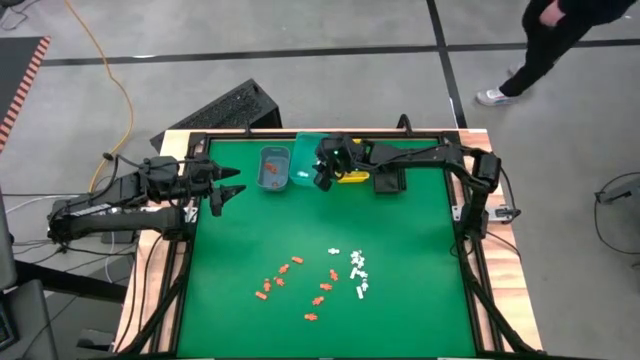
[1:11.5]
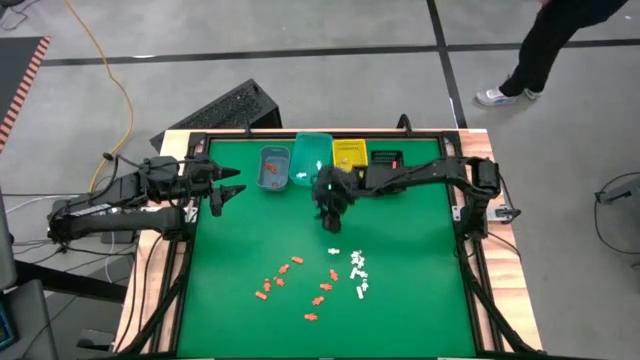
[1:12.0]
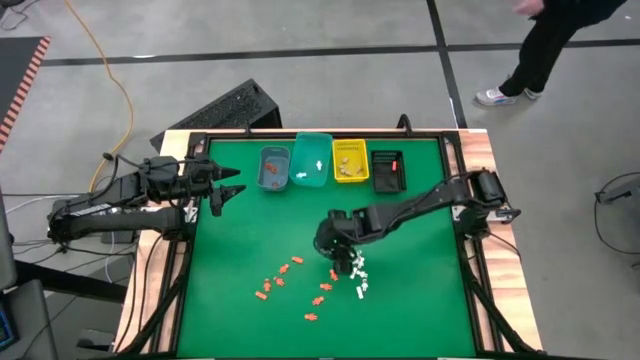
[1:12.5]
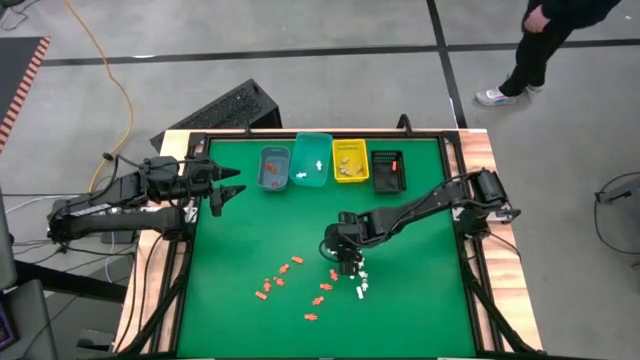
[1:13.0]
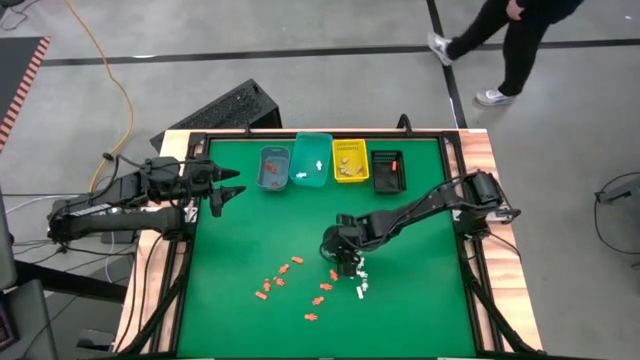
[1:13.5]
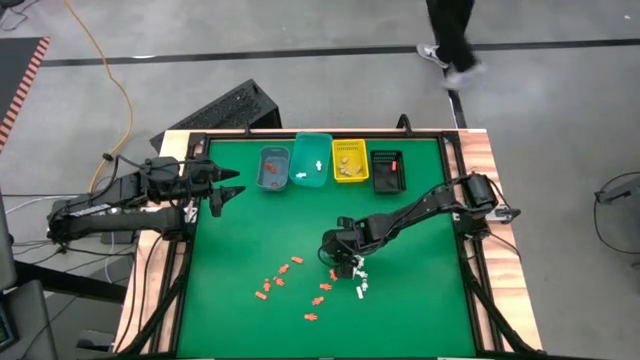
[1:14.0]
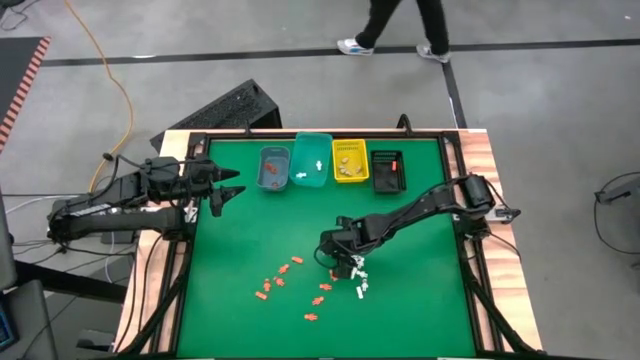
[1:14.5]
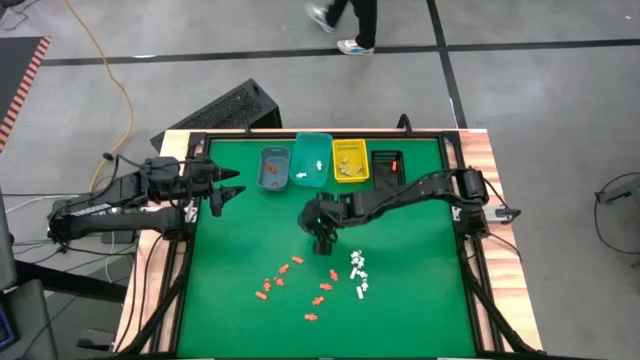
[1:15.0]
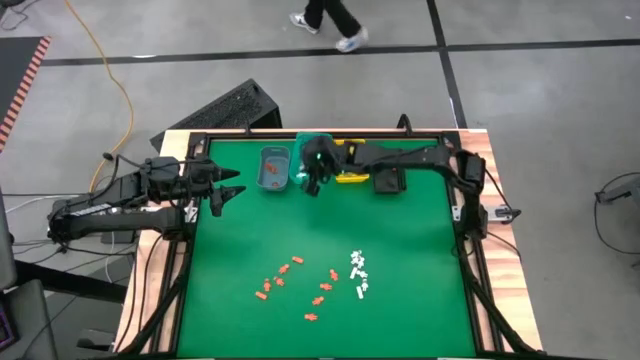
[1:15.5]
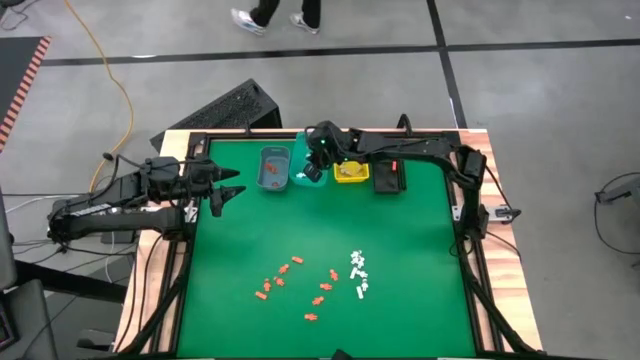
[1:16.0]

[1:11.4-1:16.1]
Task: Sort Halloween decoration
Put the white skeleton toy into the blue transparent bin

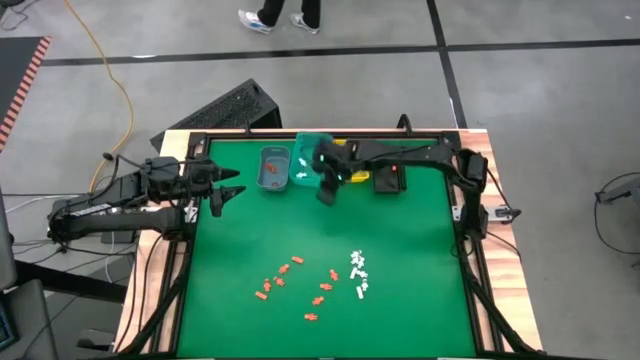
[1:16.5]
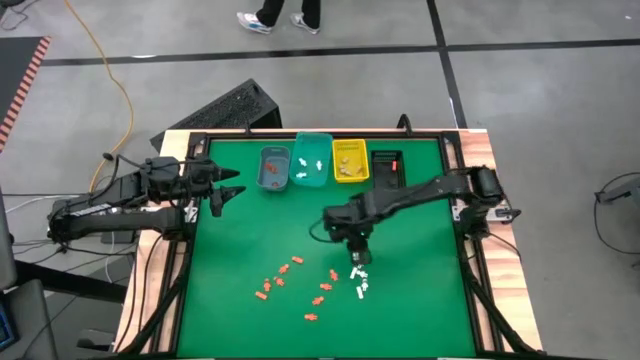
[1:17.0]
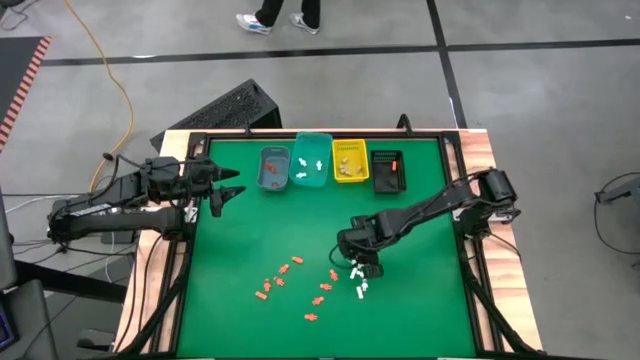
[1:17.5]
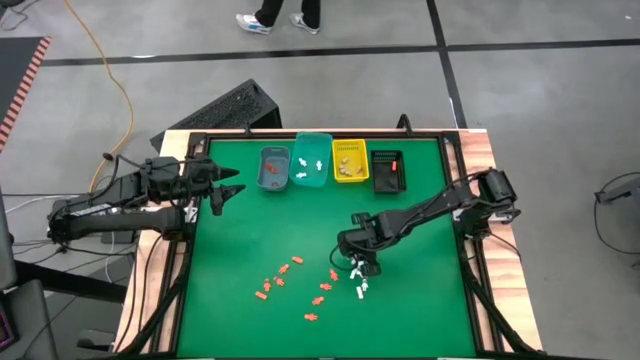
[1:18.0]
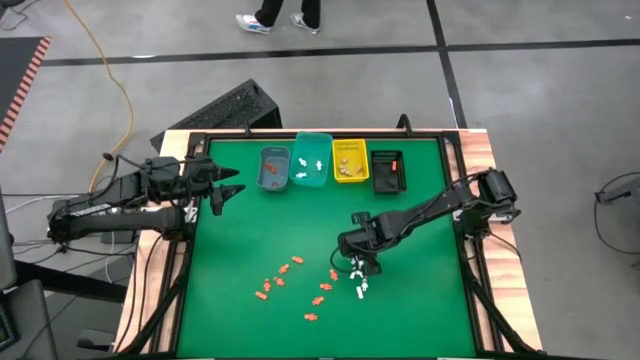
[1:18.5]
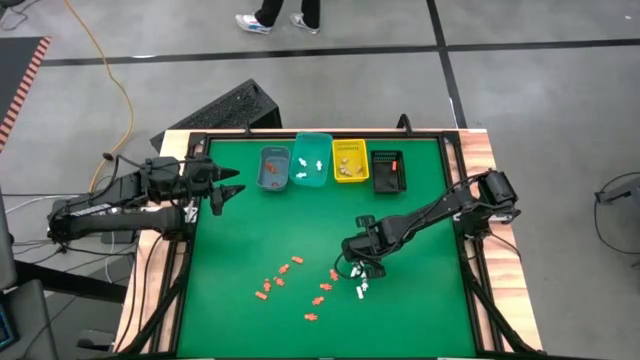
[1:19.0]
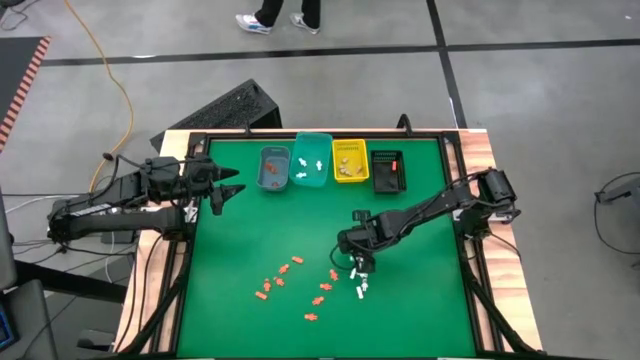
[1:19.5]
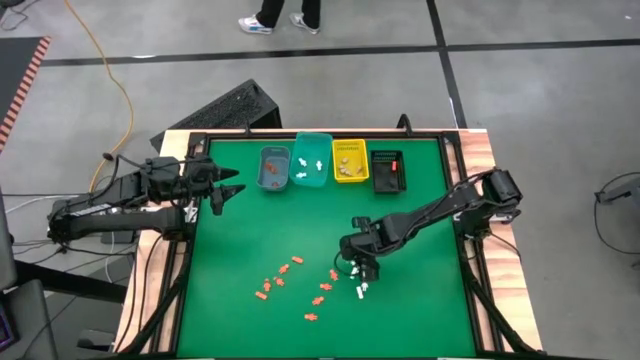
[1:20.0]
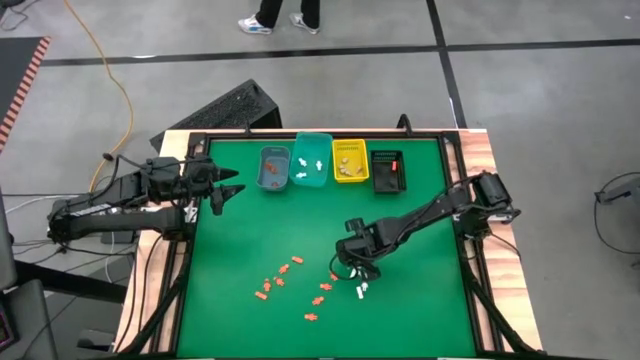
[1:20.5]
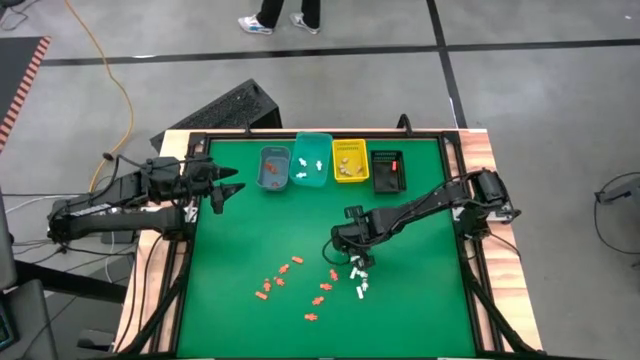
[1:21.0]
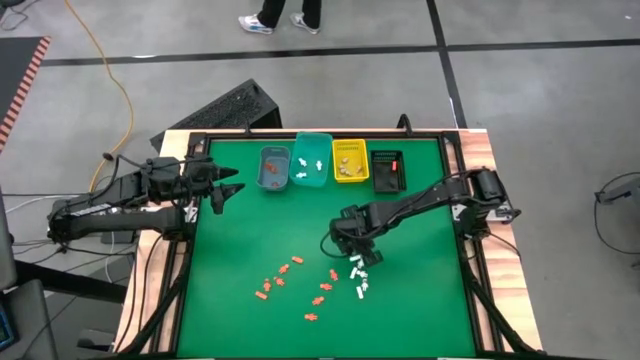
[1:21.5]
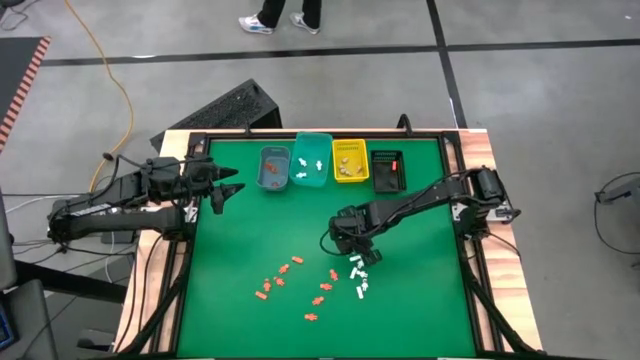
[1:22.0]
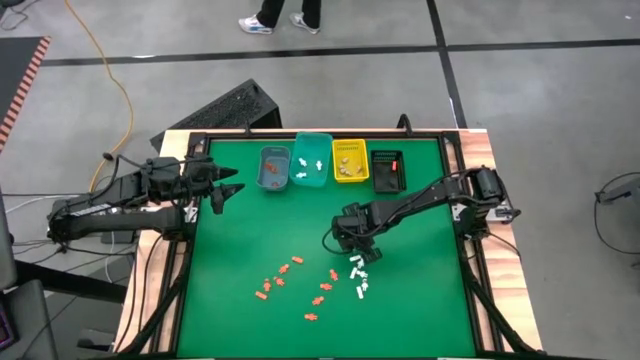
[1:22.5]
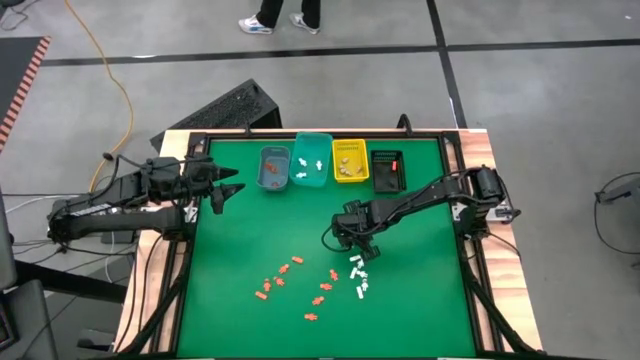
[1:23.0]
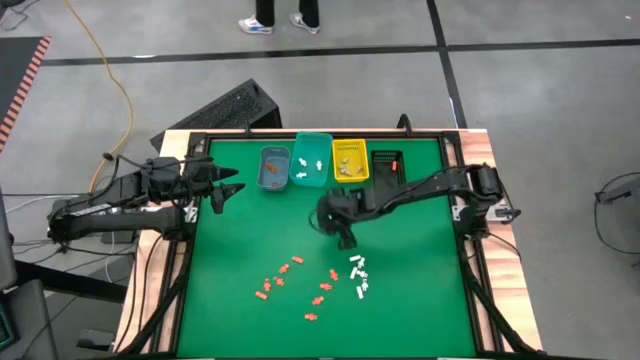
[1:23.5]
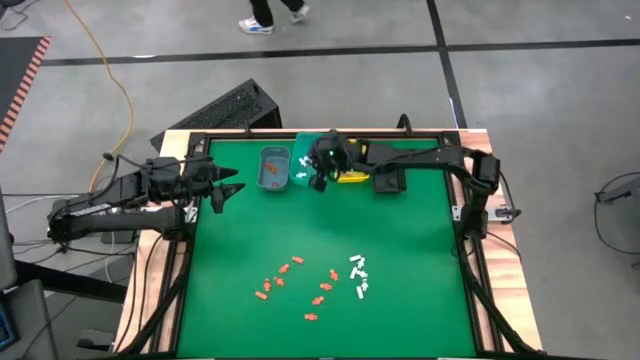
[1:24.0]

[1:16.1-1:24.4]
Put the white skeleton toy into the blue transparent bin

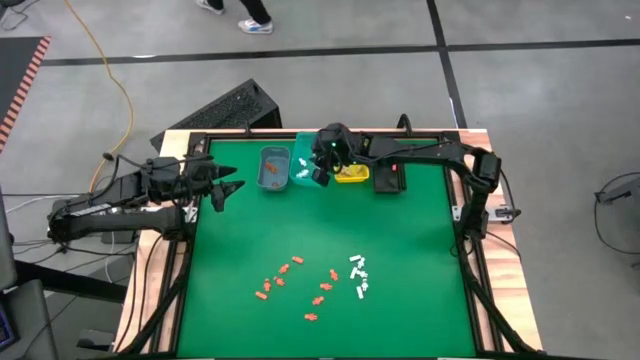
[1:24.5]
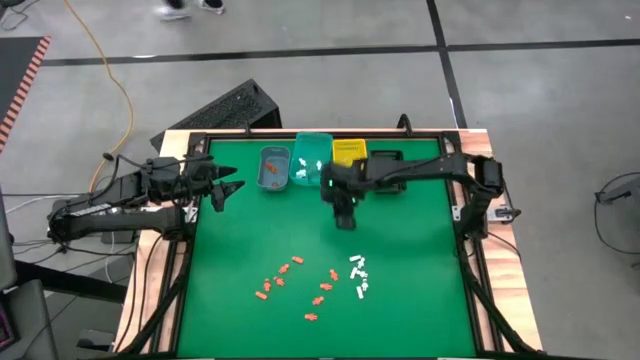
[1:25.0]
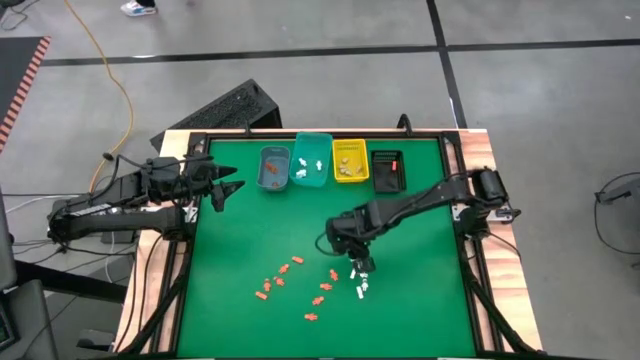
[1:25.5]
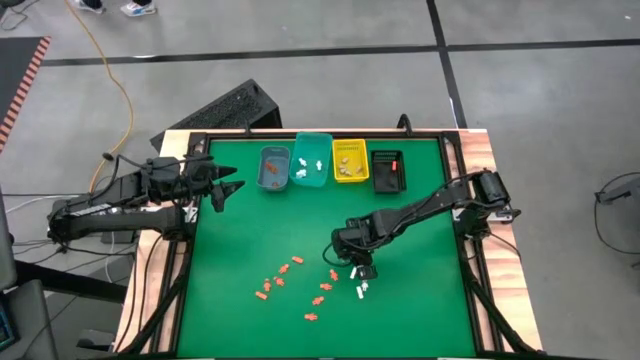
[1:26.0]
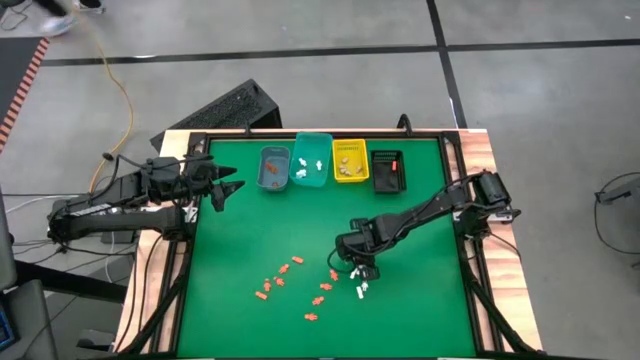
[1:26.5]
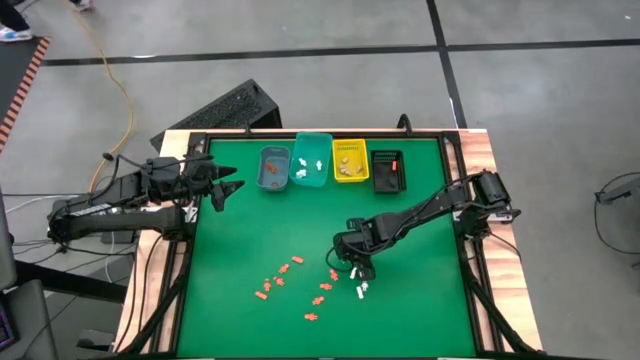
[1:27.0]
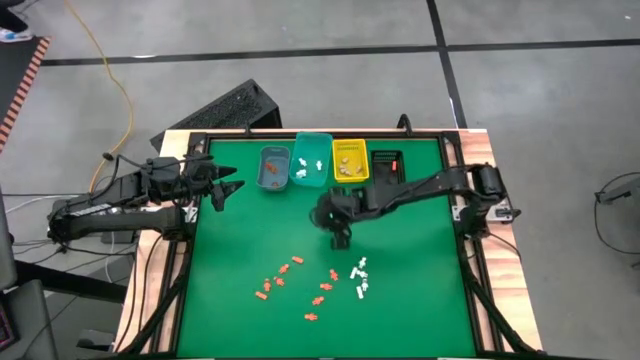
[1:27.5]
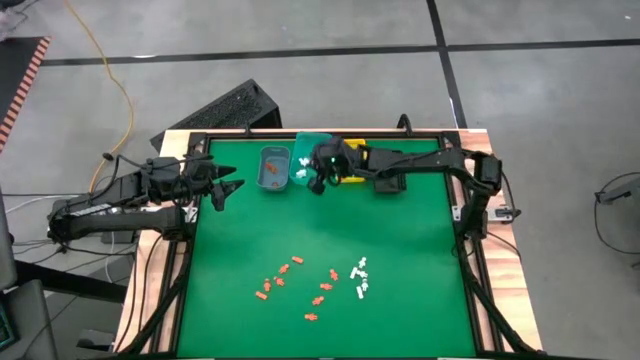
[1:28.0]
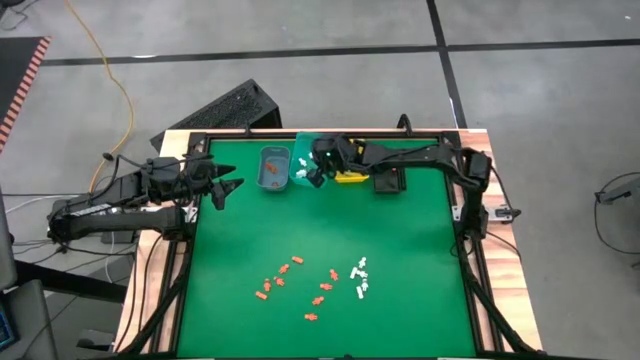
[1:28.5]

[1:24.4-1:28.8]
Put the white skeleton toy into the blue transparent bin

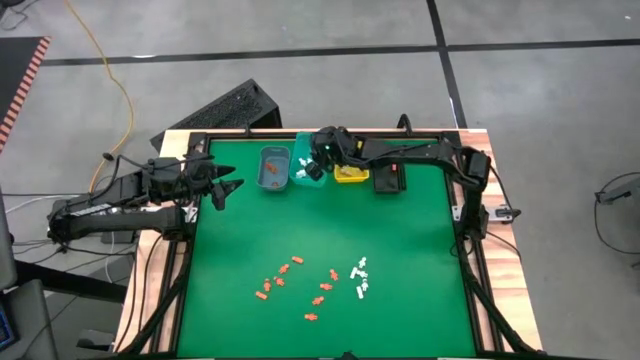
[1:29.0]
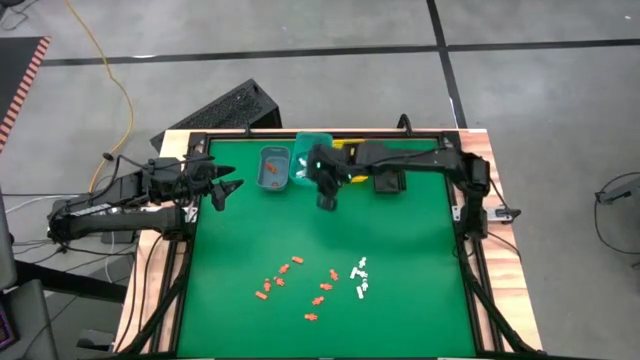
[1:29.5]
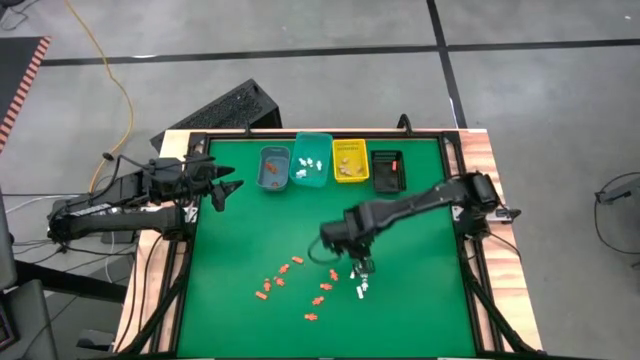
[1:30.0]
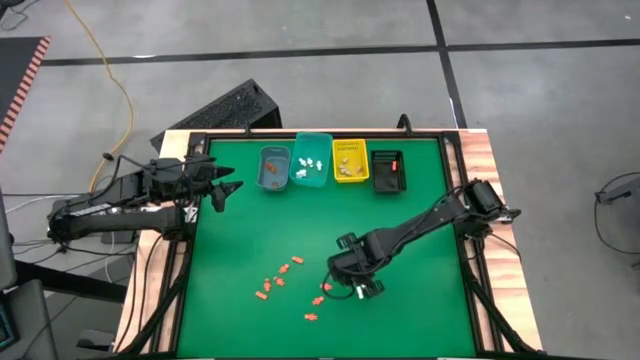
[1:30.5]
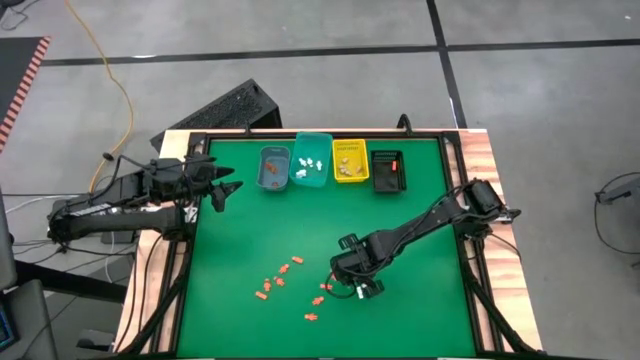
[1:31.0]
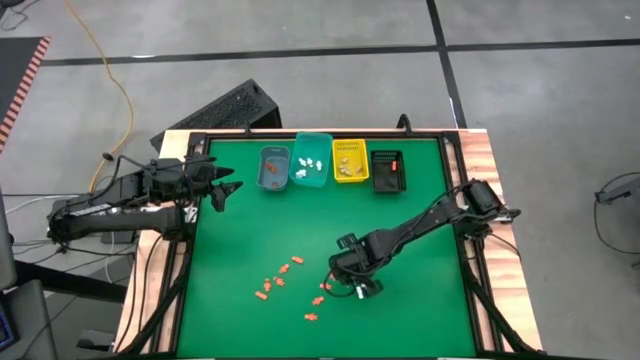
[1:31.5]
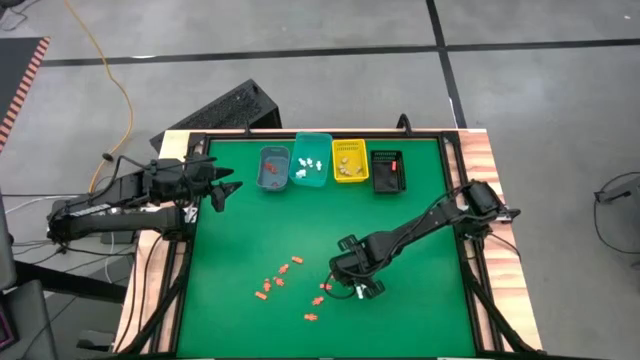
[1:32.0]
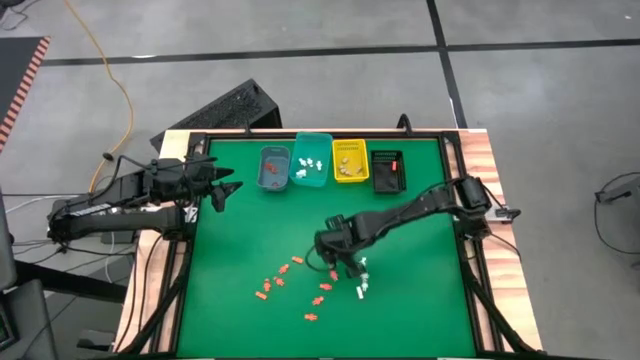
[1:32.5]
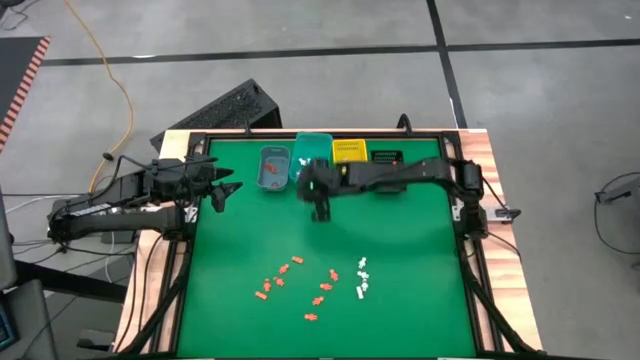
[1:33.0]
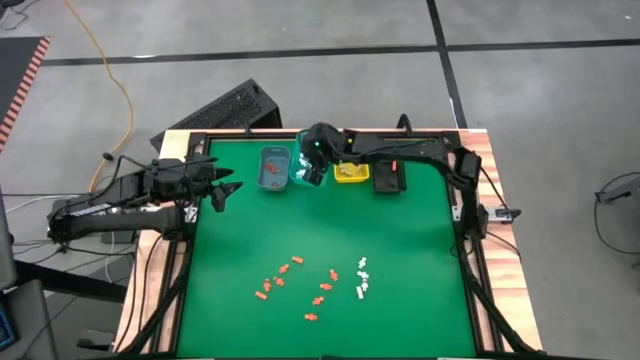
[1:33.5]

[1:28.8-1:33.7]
Put the white skeleton toy into the blue transparent bin
